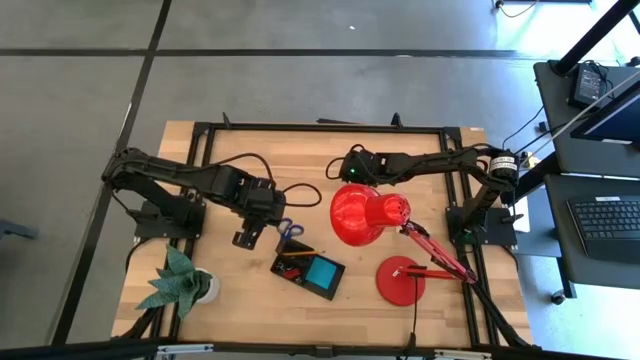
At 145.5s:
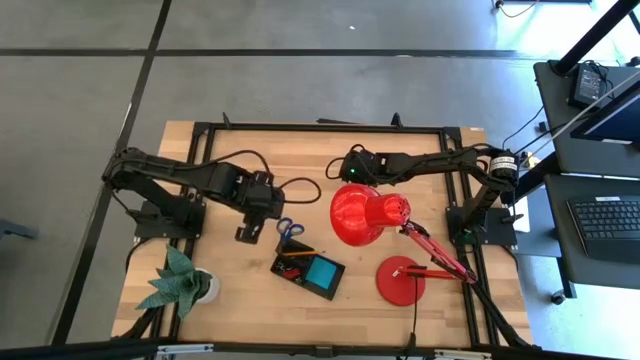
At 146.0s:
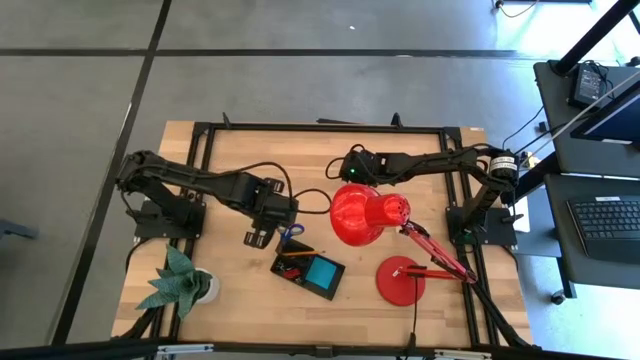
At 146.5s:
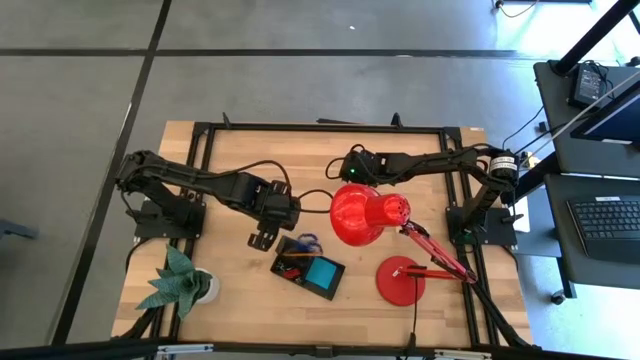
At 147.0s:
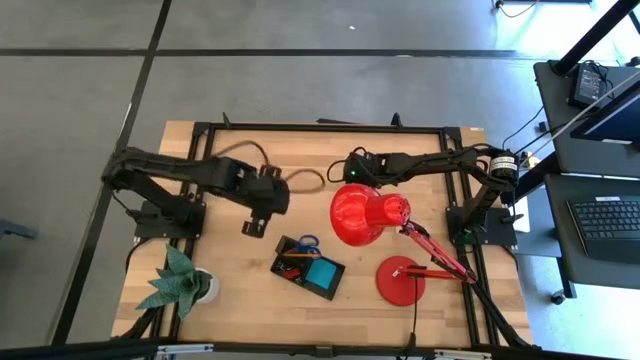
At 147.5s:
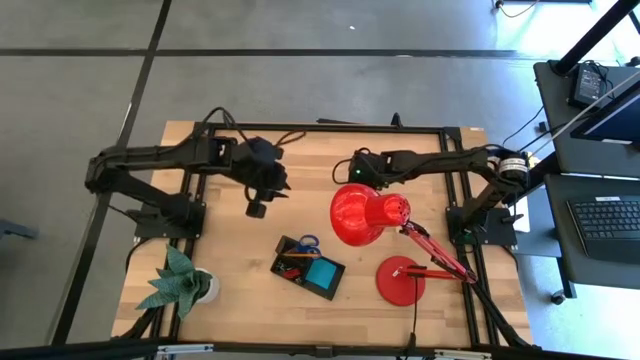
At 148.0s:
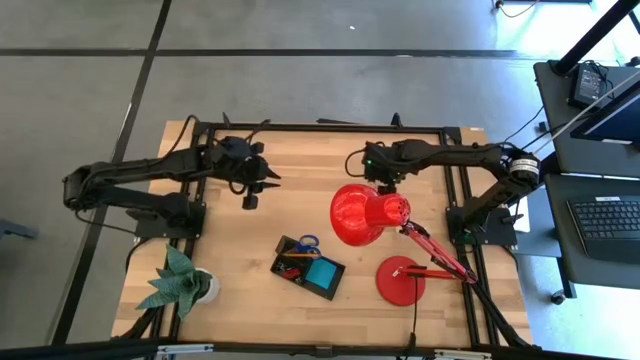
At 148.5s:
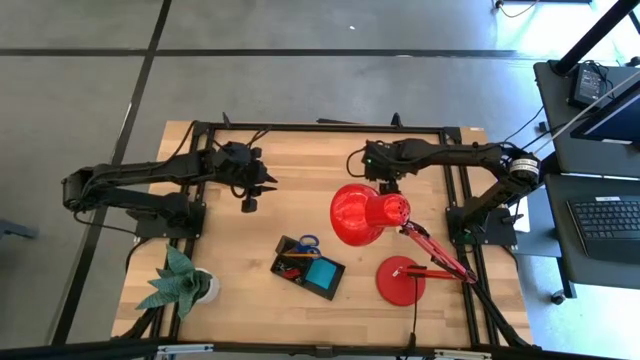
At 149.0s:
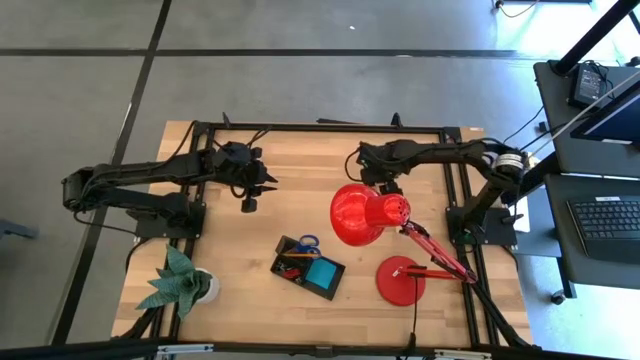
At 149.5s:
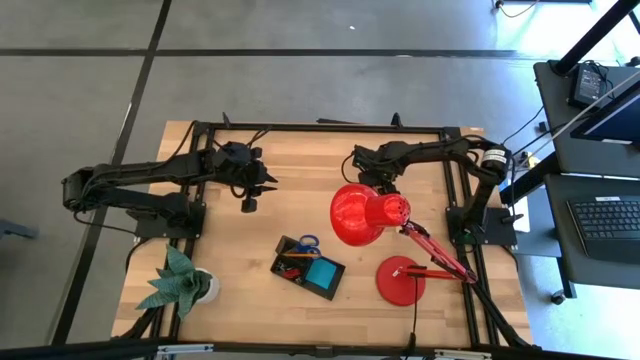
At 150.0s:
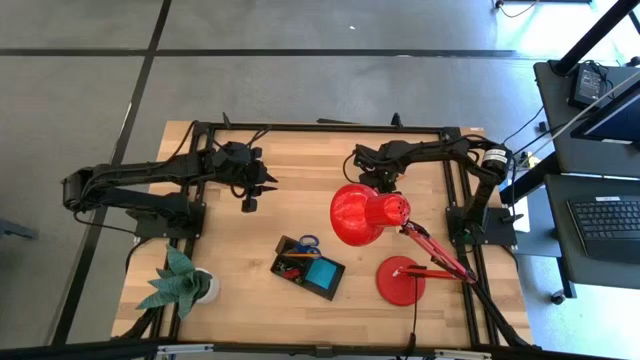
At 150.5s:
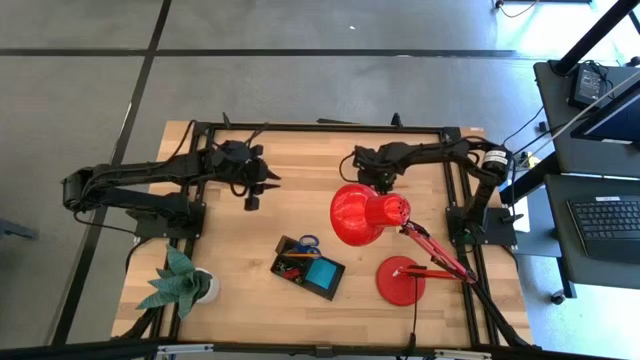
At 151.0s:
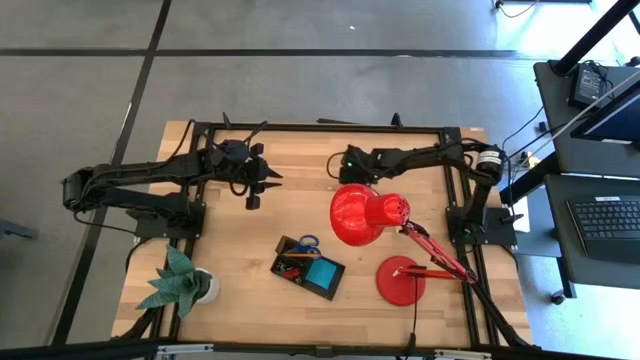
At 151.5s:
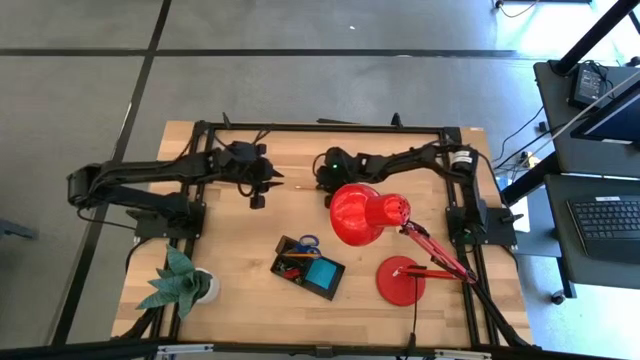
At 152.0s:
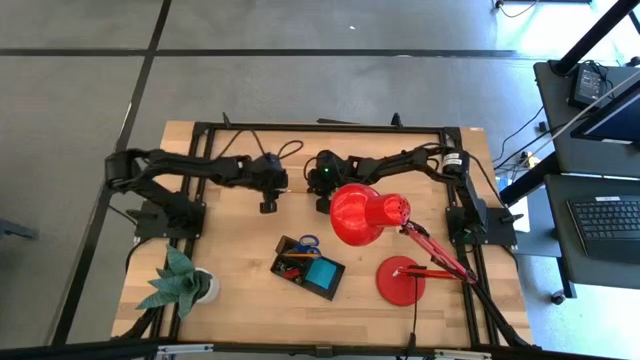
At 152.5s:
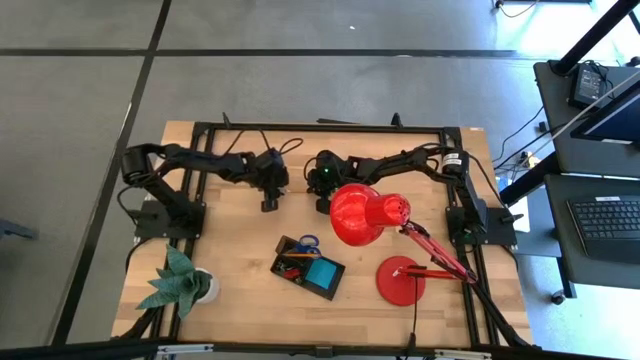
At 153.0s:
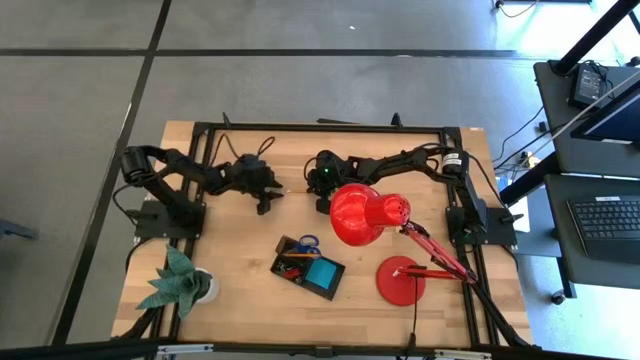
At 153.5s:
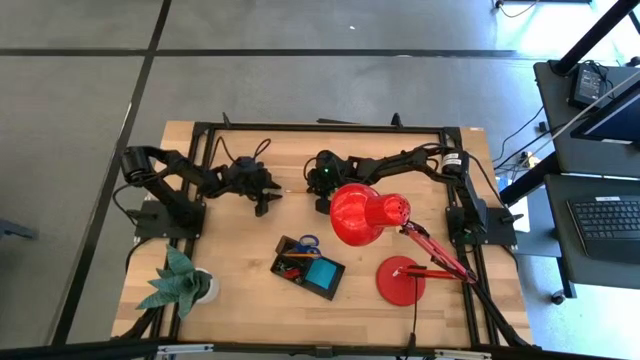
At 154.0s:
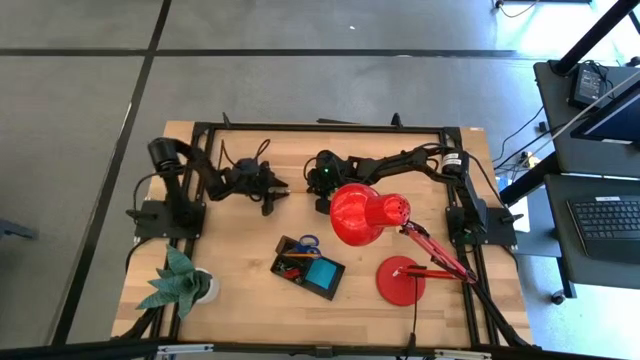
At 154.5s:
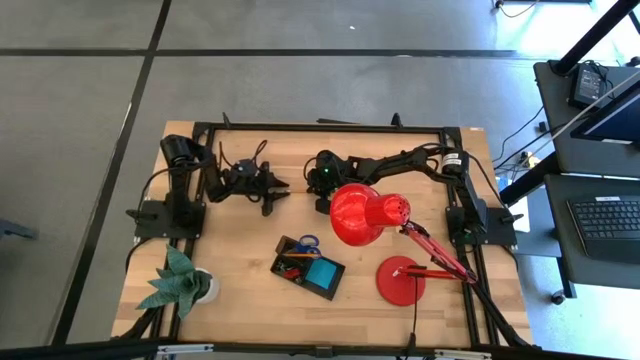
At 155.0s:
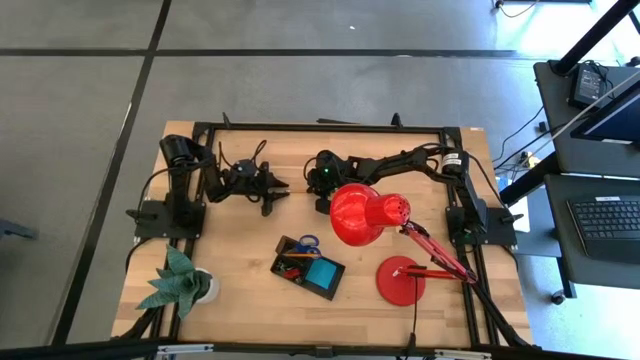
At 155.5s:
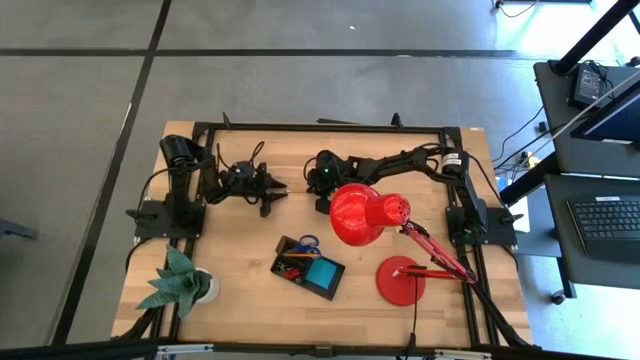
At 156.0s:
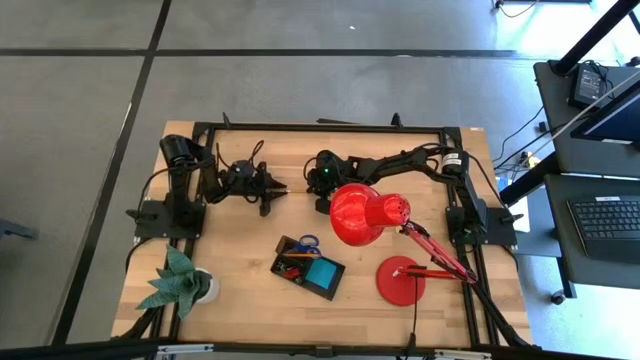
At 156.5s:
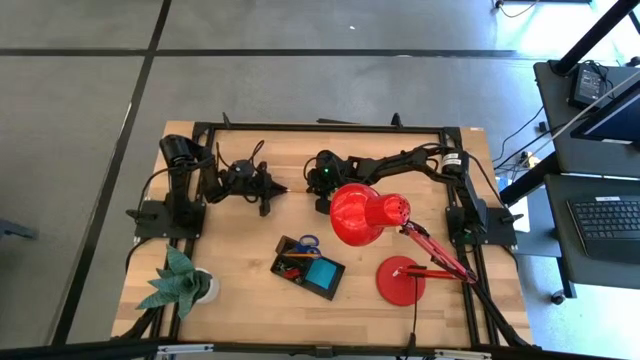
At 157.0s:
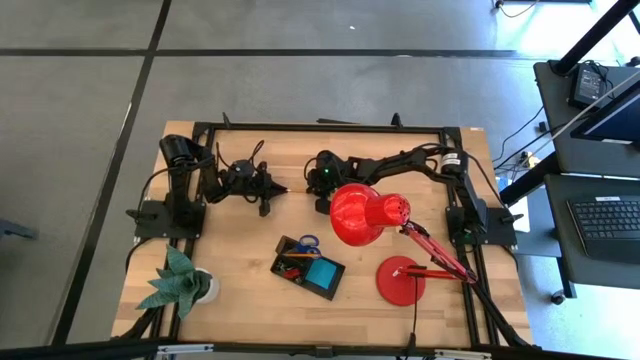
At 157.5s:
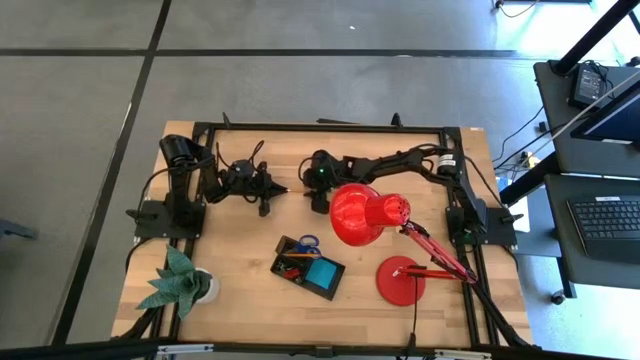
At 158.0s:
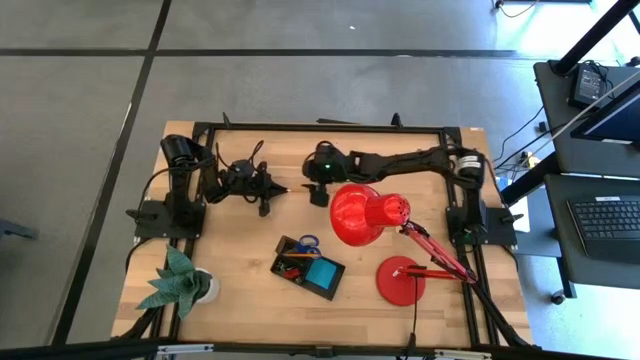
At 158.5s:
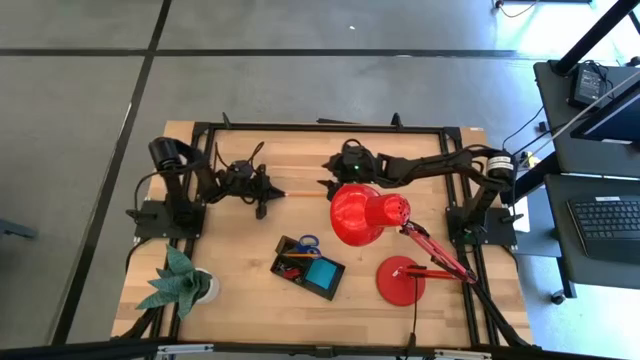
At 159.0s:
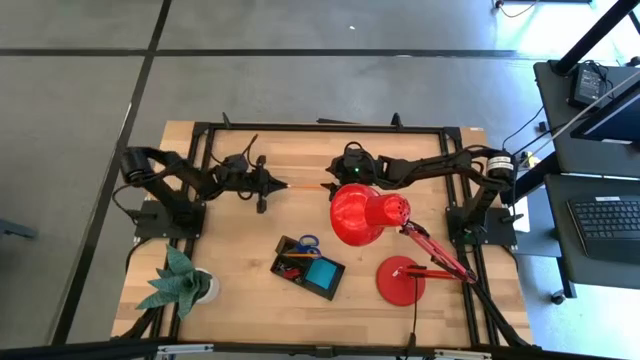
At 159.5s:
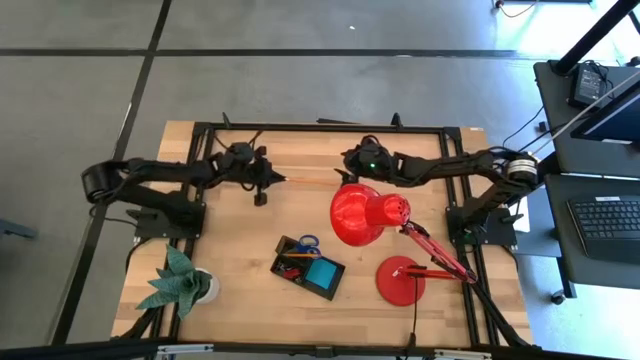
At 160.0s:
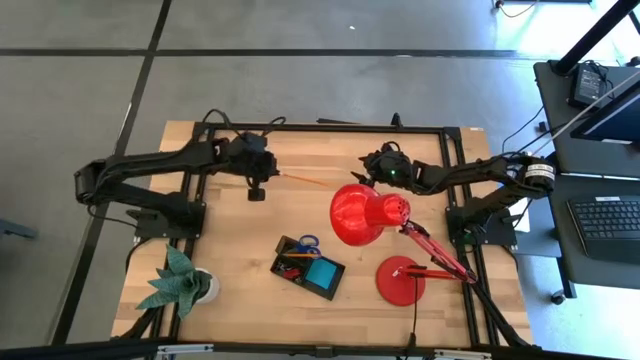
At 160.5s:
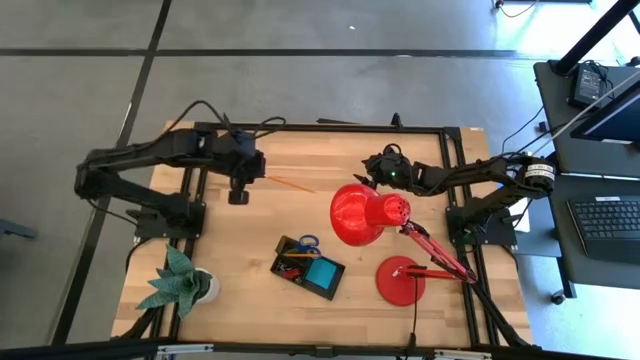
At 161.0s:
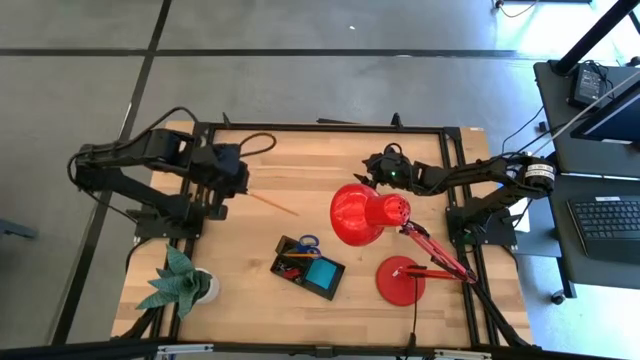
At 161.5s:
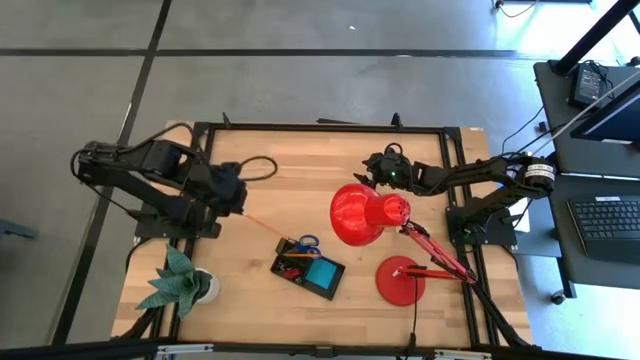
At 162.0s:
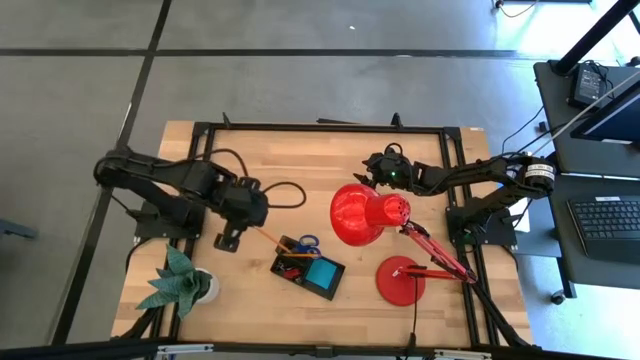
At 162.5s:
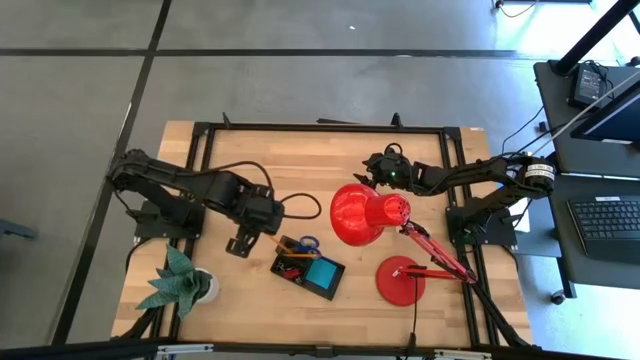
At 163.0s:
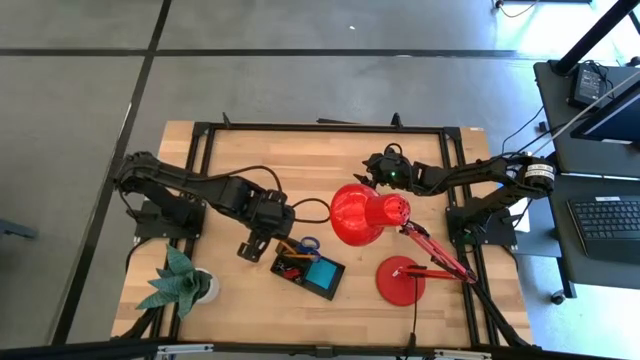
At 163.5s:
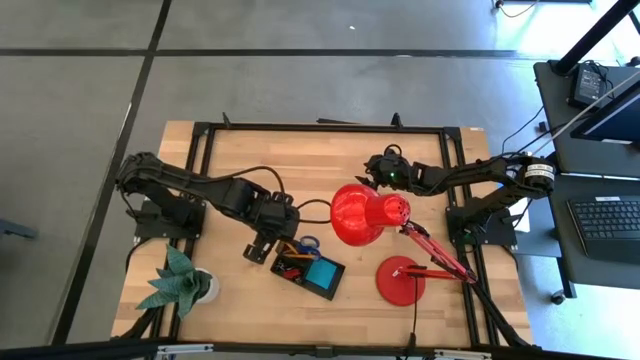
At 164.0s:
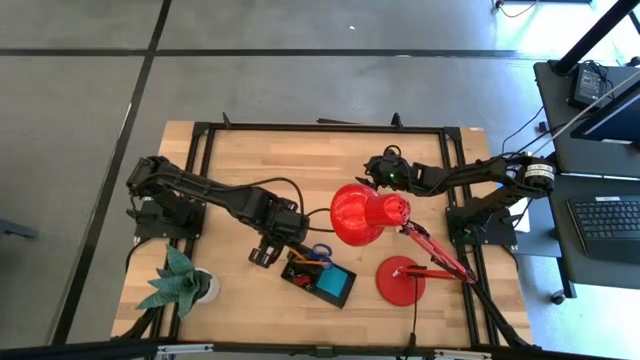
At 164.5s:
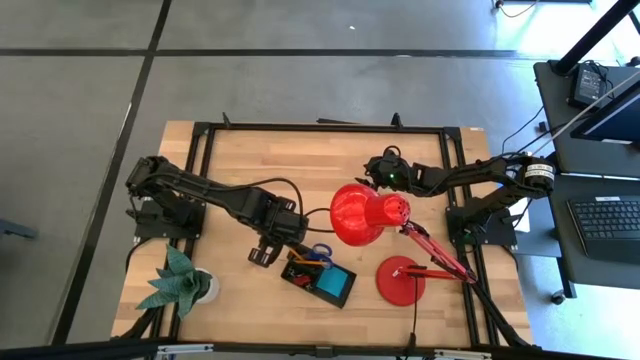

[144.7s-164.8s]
Task: Pick and place office supplies into organizer
Put the orange pencil into the desk organizer

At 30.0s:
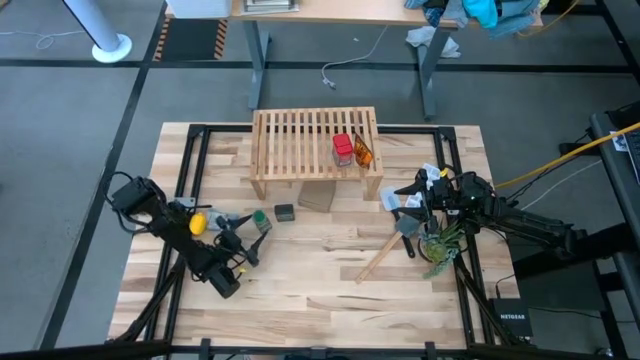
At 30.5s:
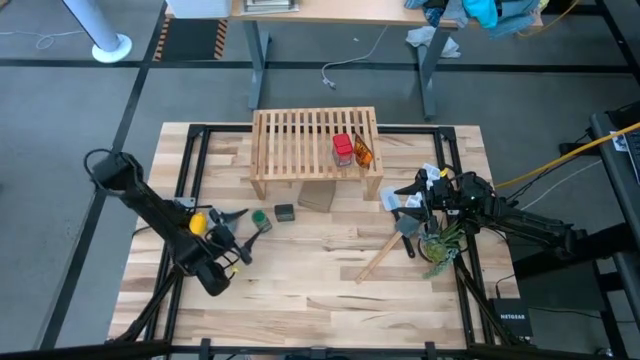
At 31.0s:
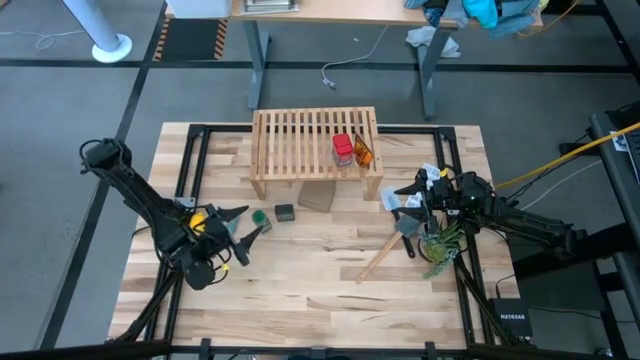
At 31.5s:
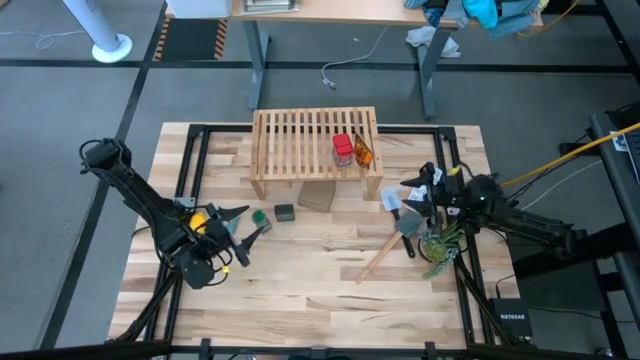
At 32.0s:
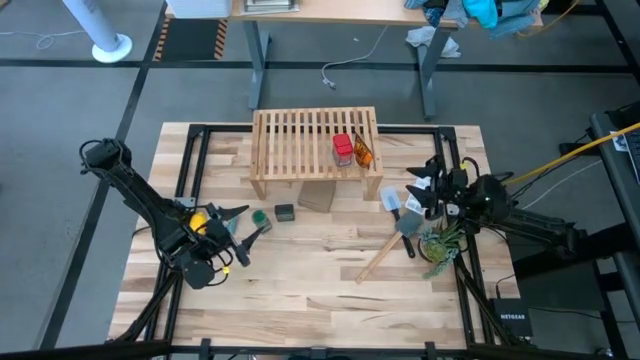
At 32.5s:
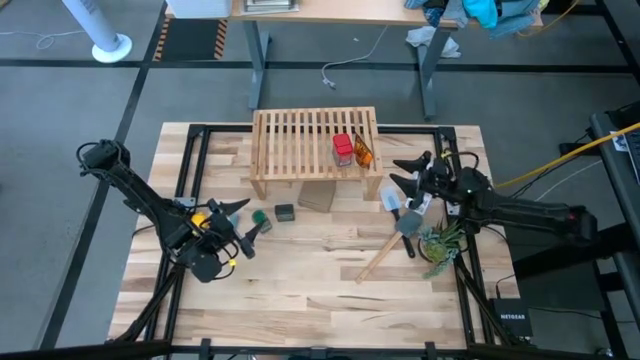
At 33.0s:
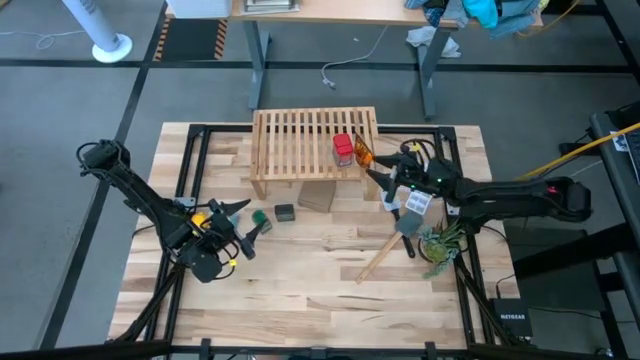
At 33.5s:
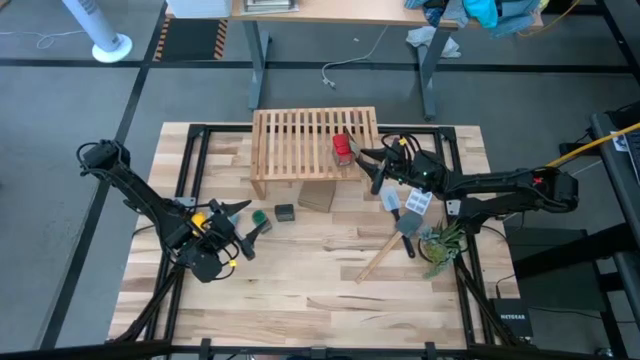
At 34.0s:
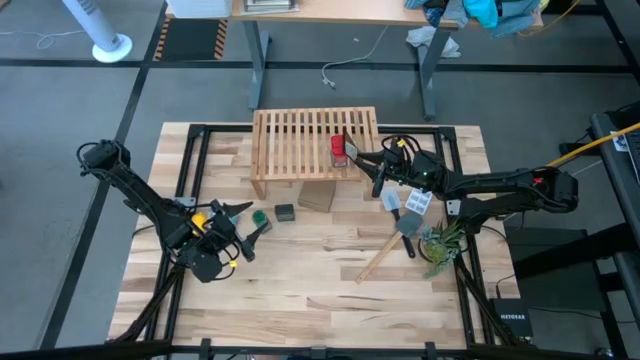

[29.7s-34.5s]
Task: Shelf spices
Remove the orange seasoning pack from the shelf
